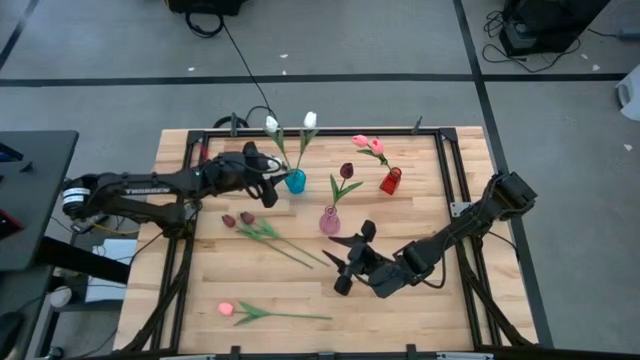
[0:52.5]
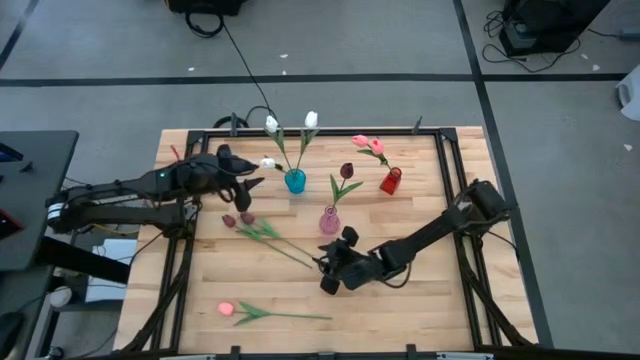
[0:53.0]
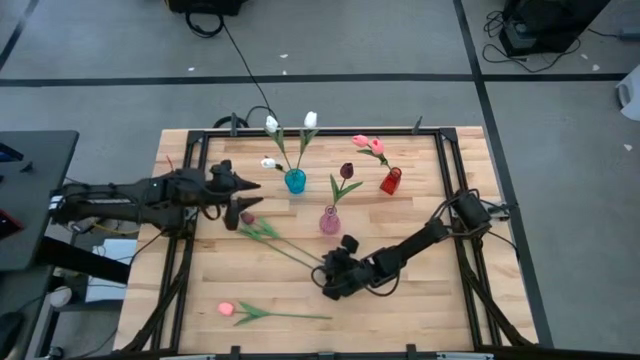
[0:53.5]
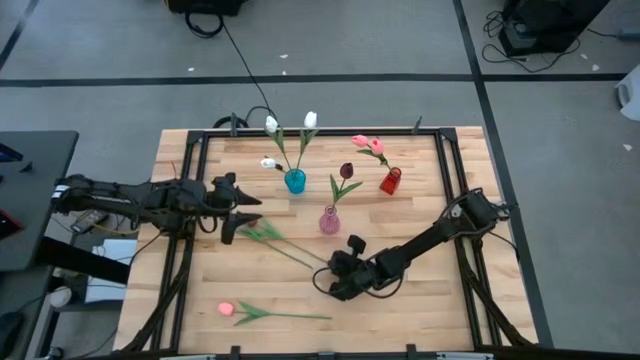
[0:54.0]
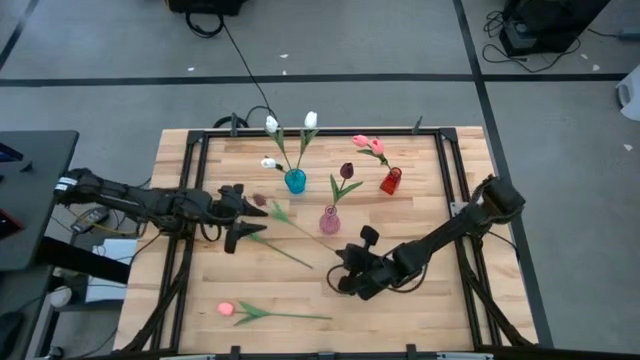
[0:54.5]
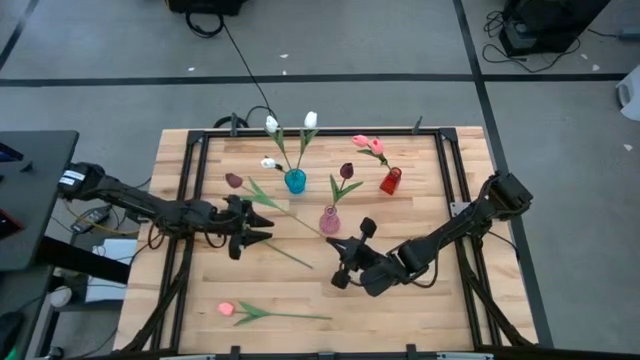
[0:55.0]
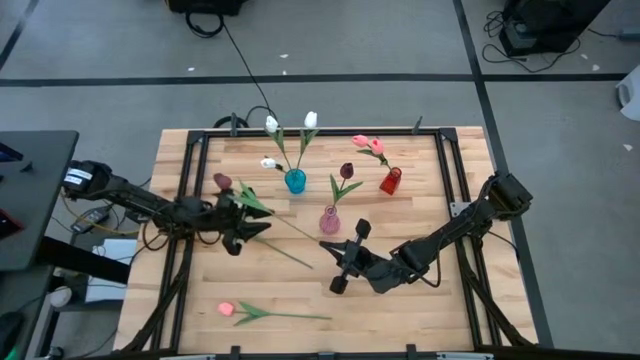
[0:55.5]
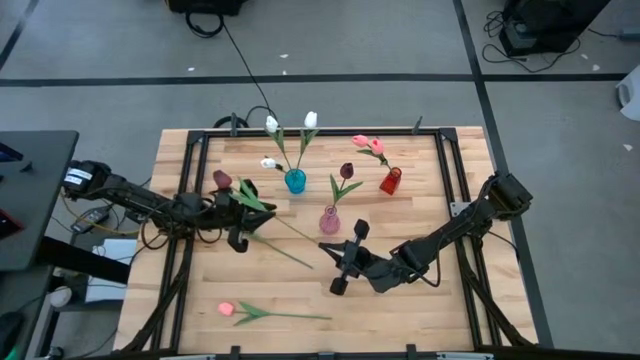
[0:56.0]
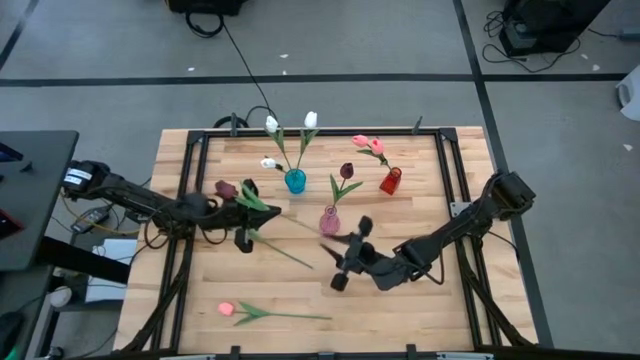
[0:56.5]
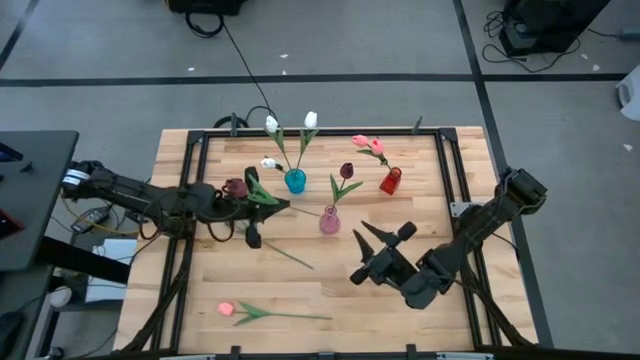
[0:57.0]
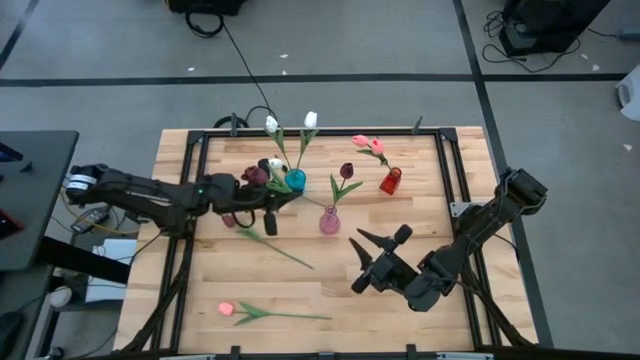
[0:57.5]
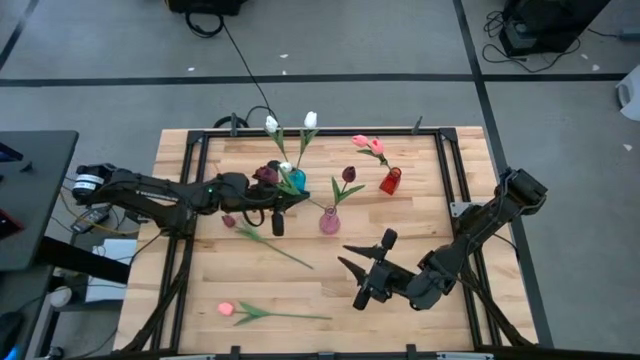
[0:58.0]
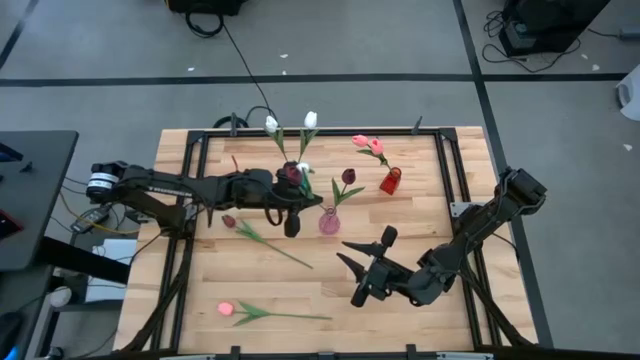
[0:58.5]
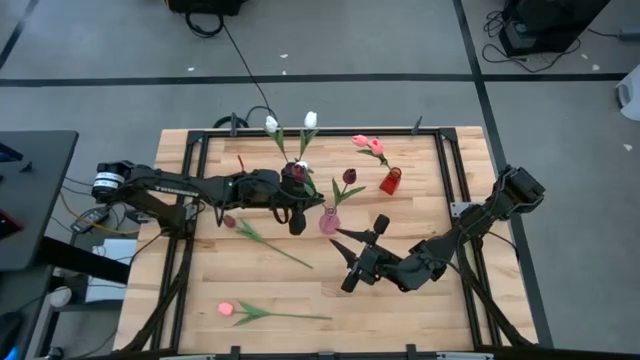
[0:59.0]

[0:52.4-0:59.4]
Task: Sort flowers into vase by color
Put the top red tulip into the pink vase

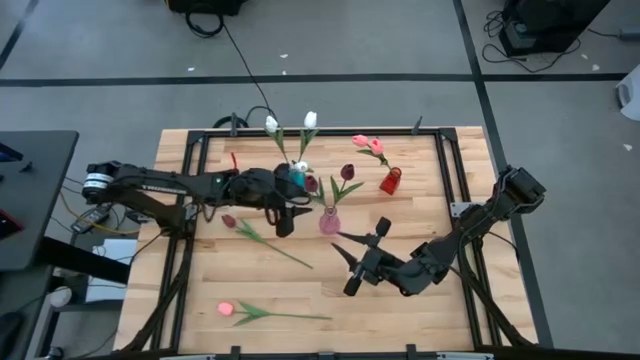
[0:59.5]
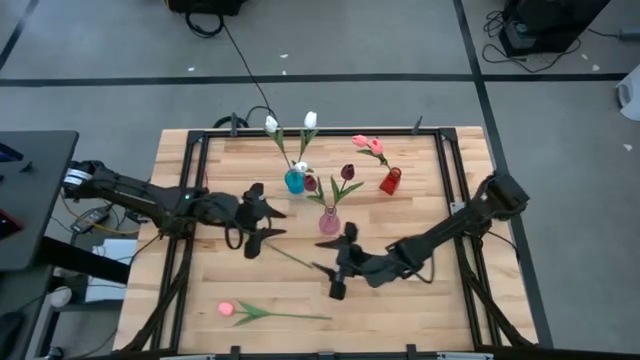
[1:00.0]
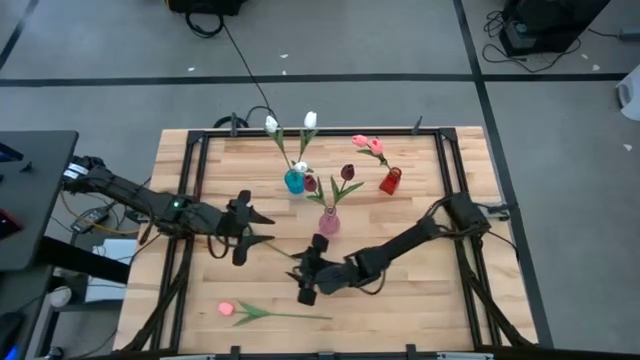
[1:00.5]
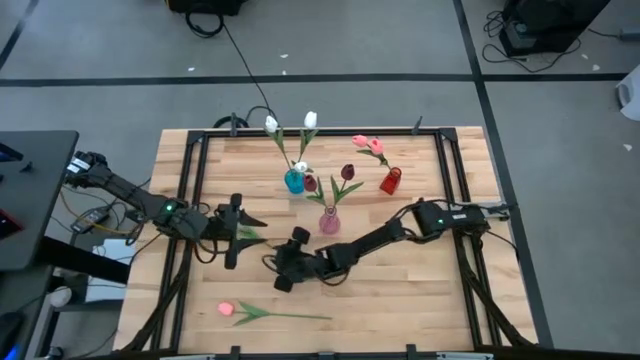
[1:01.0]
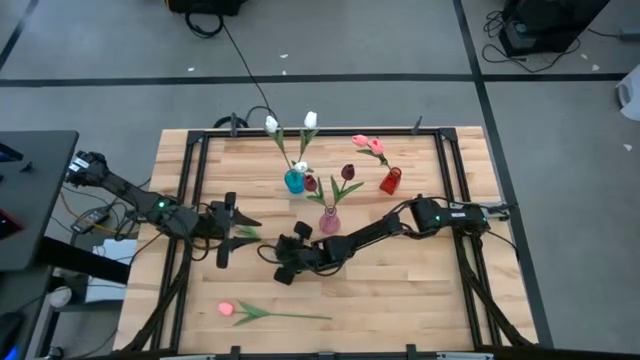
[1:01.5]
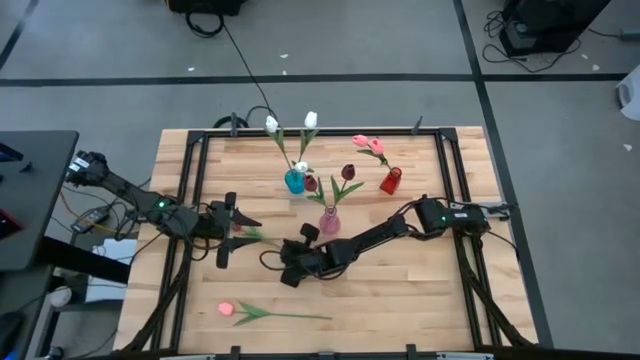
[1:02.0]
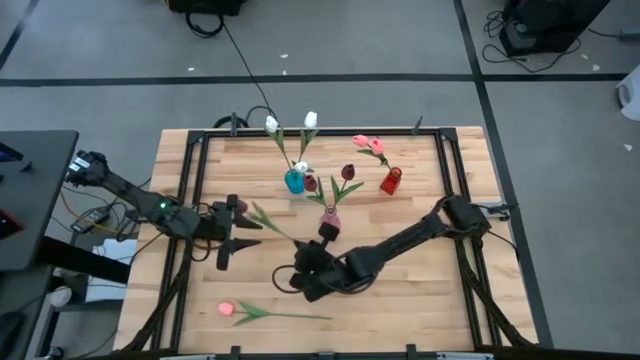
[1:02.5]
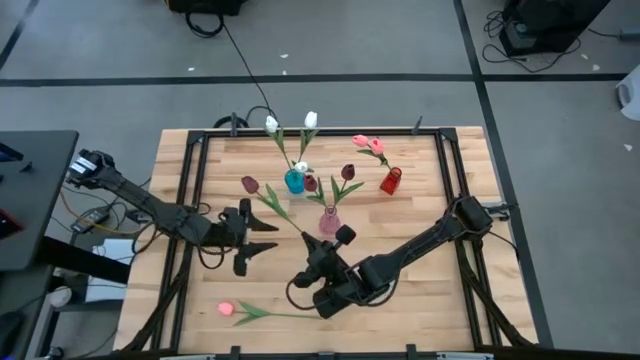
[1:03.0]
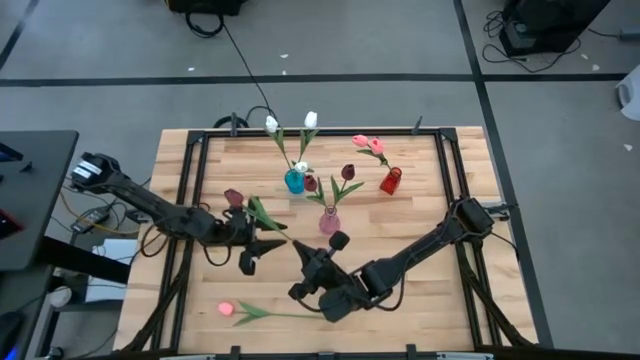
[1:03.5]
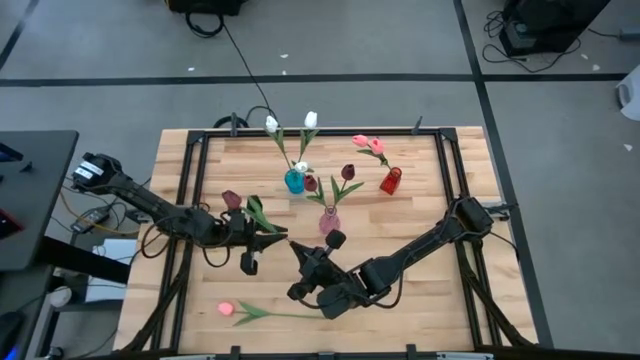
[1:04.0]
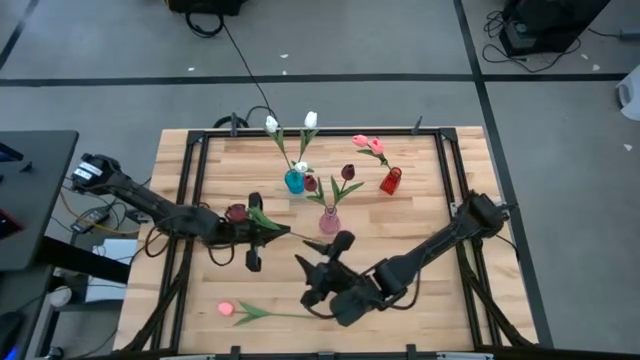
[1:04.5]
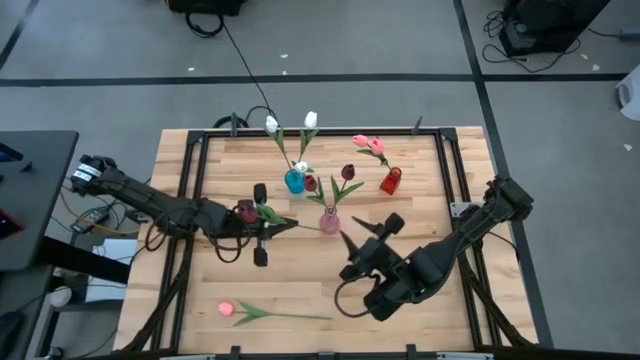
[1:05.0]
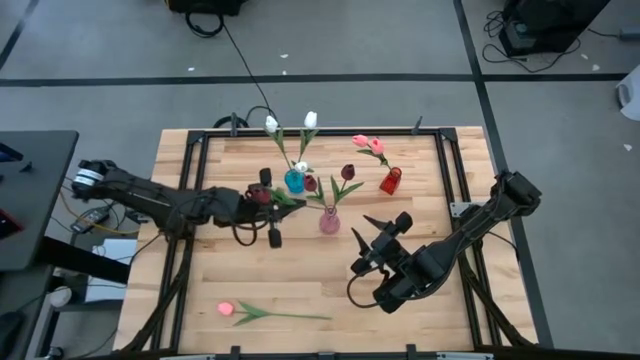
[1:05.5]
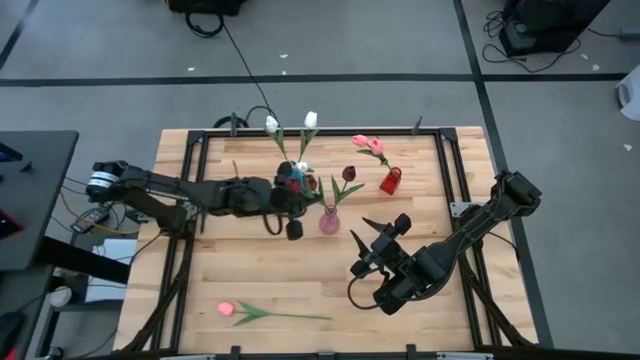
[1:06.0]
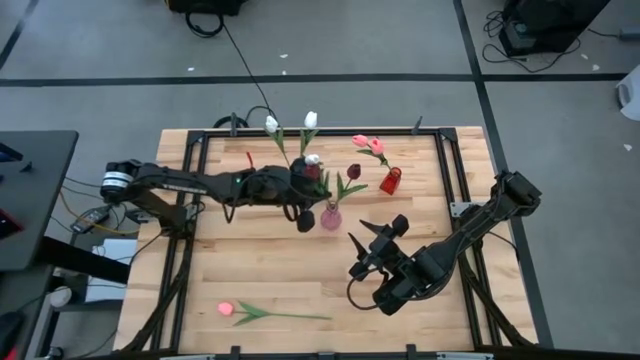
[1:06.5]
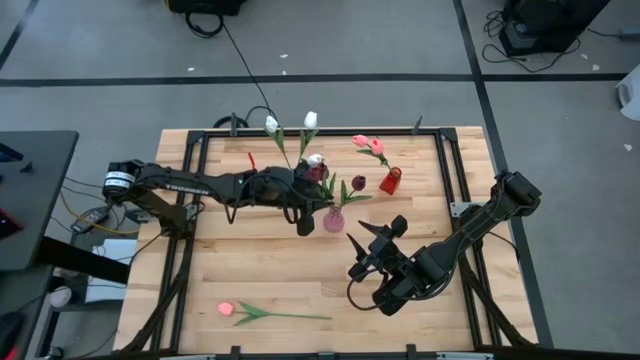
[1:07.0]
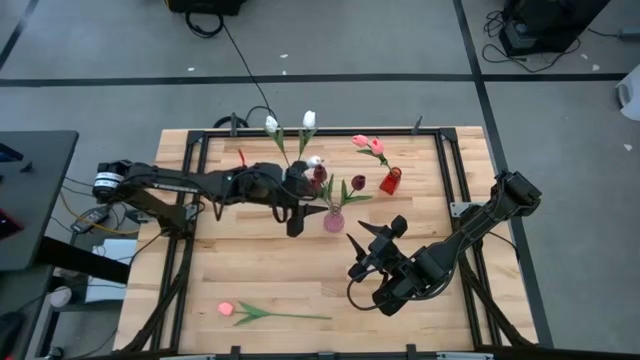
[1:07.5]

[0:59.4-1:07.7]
Put the red tulip into the pink vase

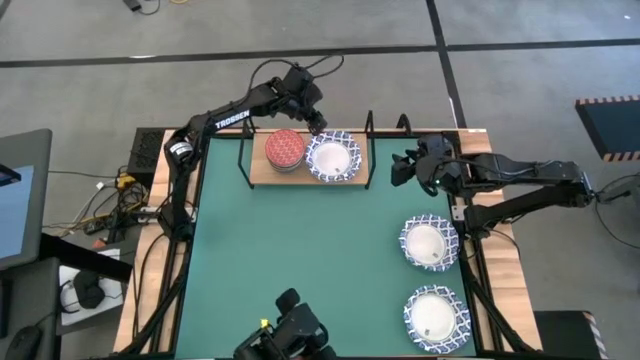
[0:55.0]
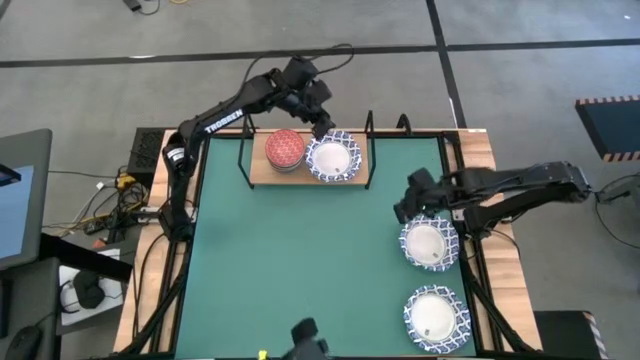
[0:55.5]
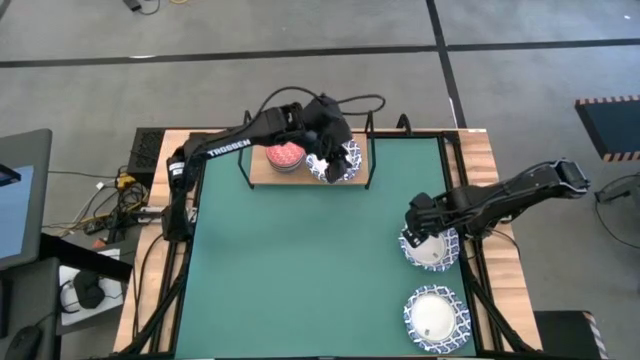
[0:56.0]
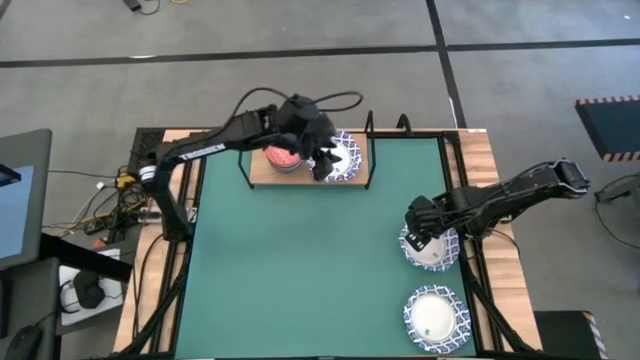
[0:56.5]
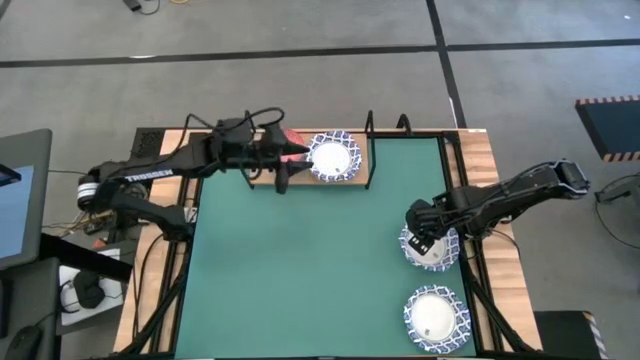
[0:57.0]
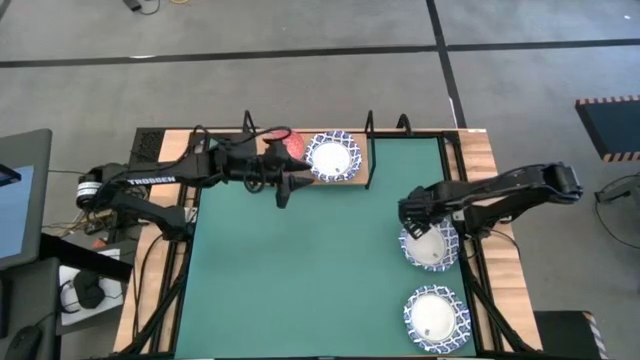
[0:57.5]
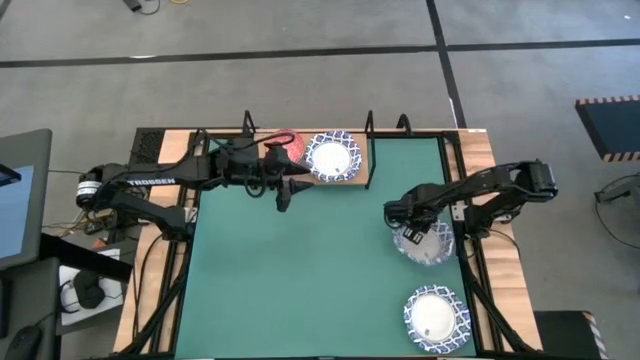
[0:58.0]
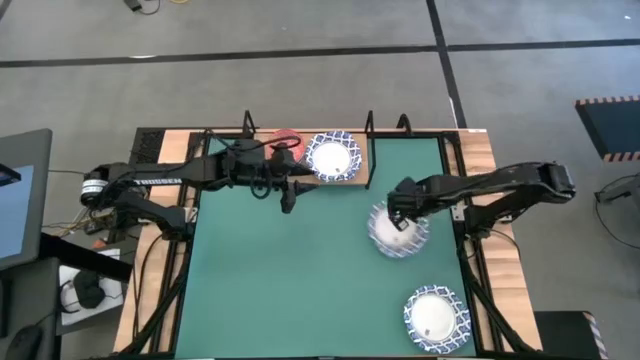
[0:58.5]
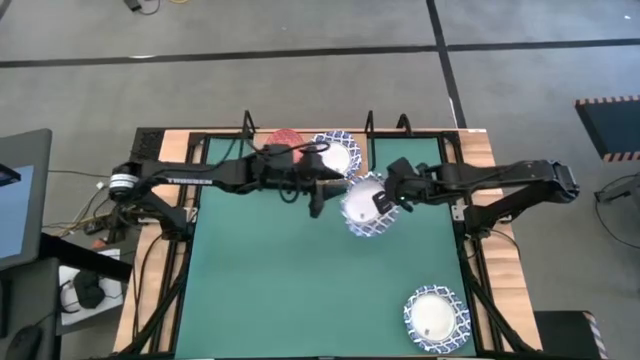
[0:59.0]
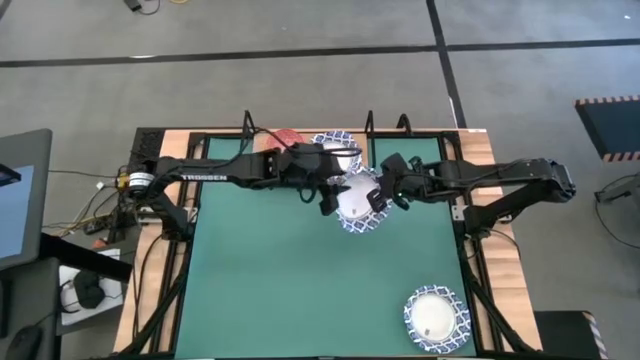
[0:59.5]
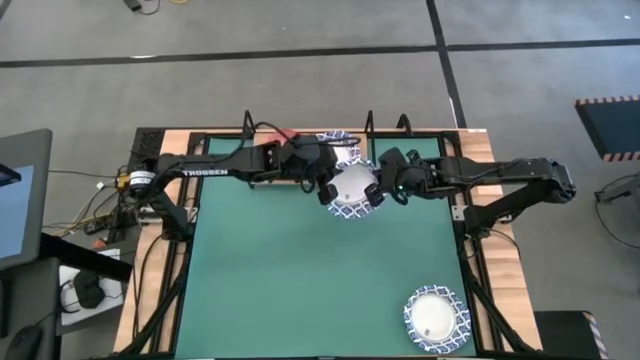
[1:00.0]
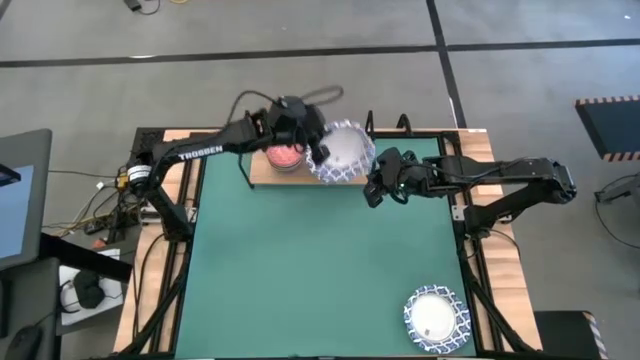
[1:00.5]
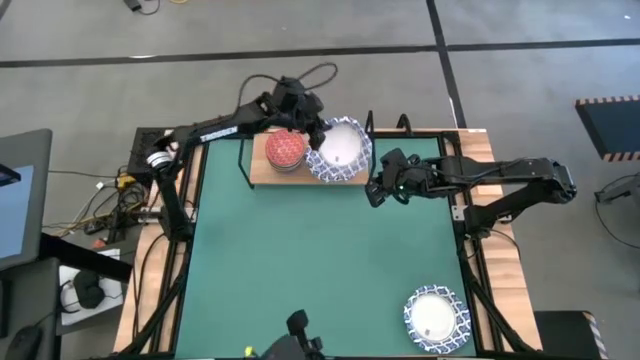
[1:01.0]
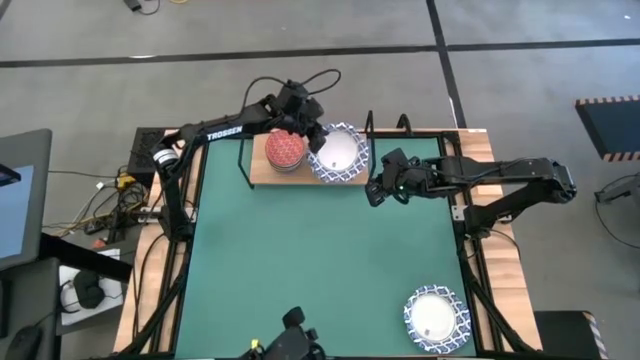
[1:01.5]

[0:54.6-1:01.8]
Task: Place and stack bowls onto a shelf
Stack the white blue bowl on top of the white blue bowls on the shelf
